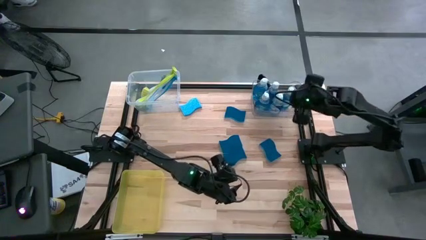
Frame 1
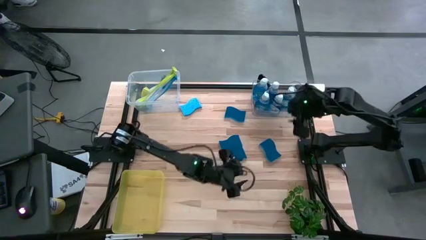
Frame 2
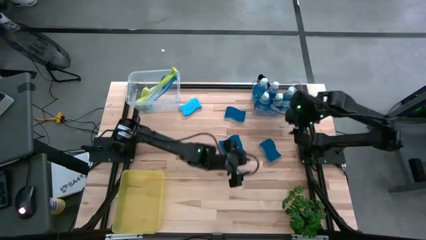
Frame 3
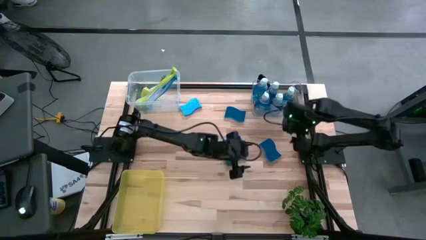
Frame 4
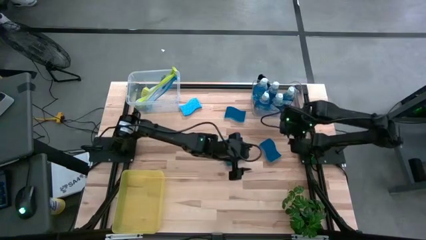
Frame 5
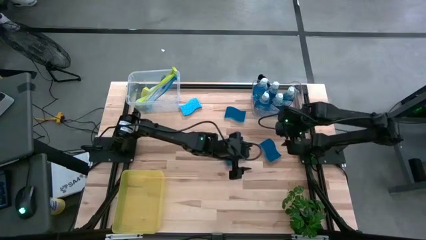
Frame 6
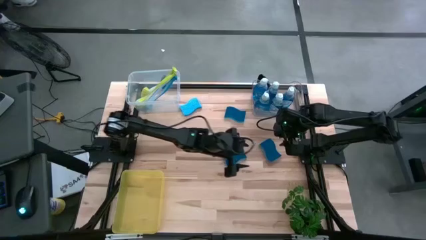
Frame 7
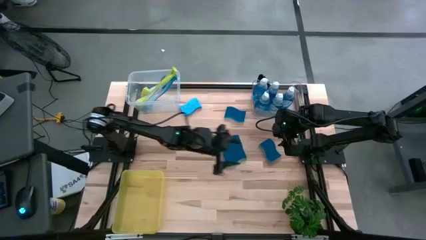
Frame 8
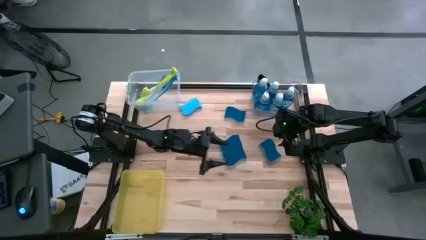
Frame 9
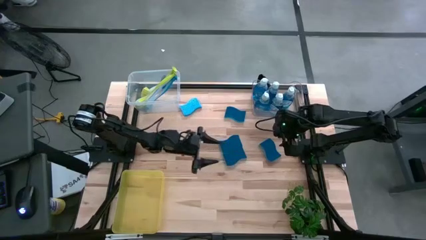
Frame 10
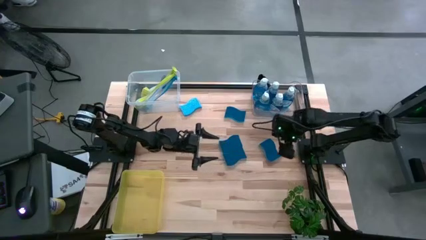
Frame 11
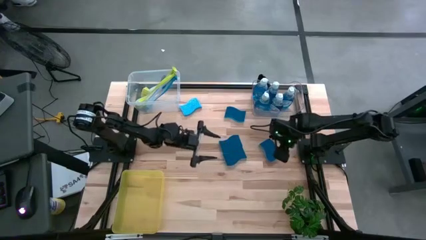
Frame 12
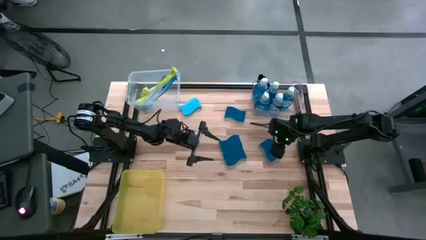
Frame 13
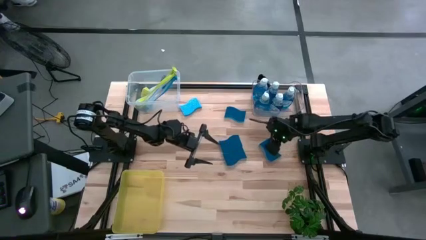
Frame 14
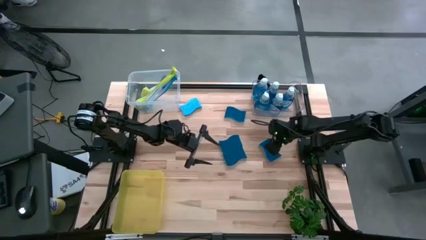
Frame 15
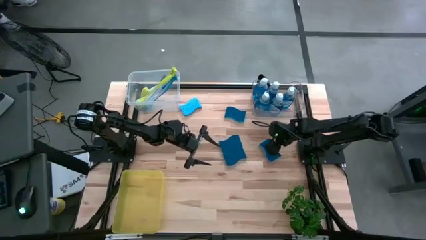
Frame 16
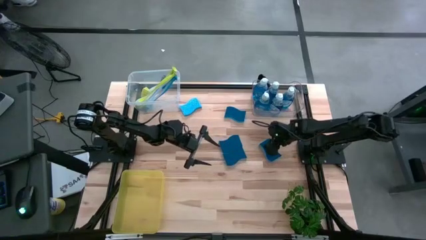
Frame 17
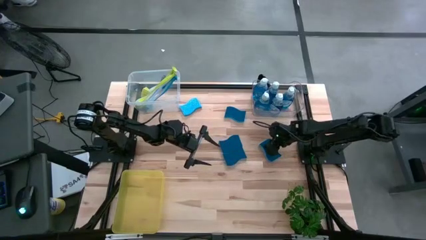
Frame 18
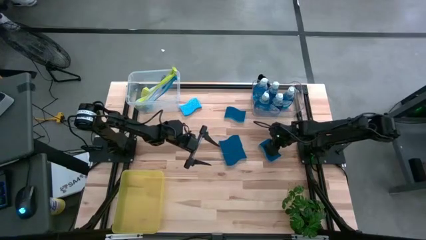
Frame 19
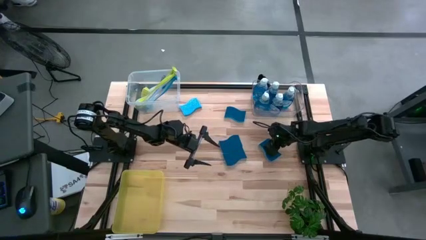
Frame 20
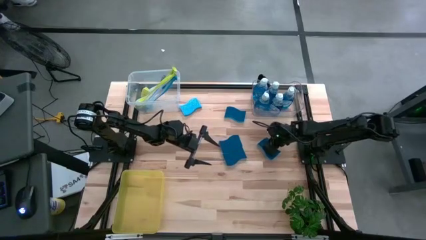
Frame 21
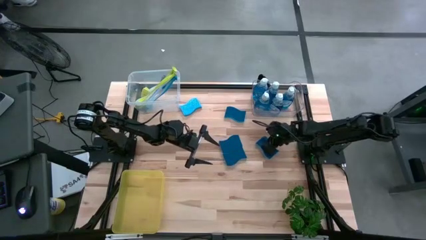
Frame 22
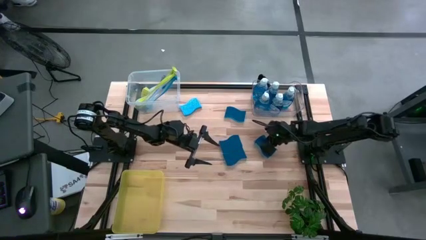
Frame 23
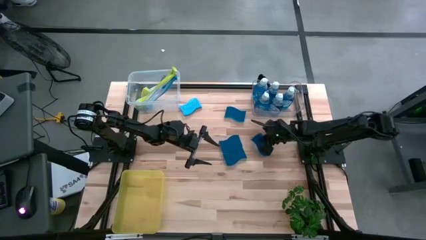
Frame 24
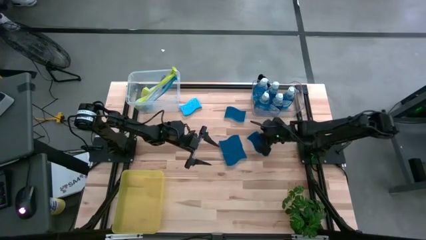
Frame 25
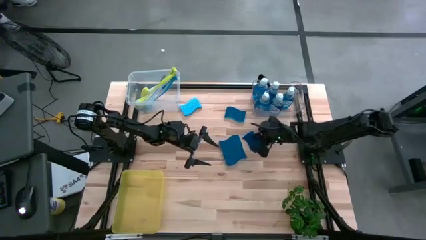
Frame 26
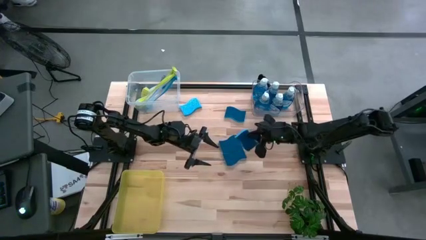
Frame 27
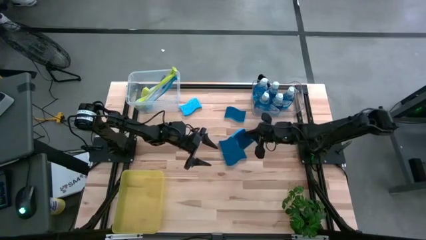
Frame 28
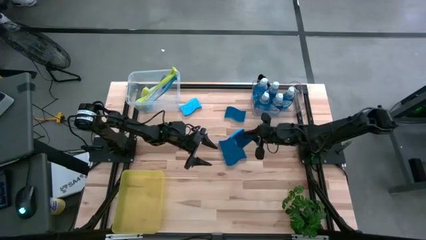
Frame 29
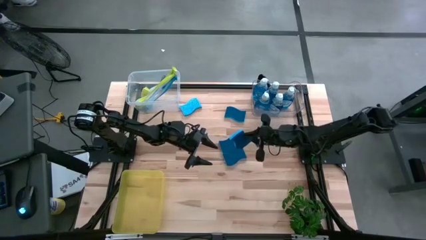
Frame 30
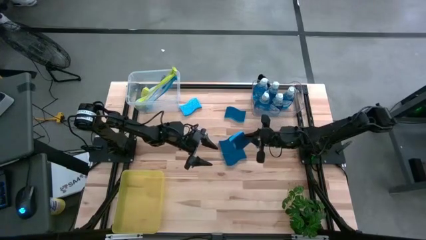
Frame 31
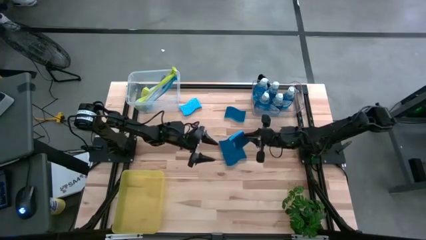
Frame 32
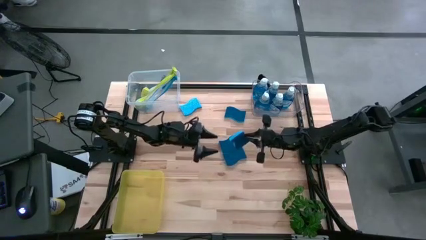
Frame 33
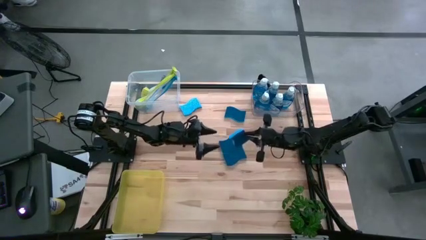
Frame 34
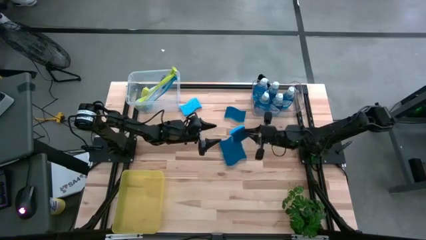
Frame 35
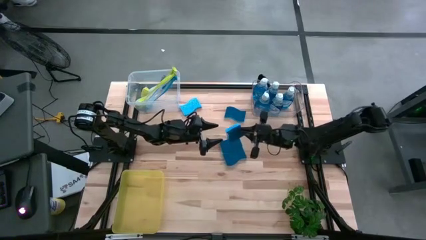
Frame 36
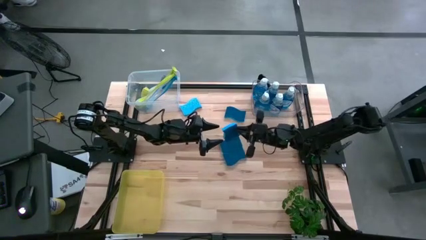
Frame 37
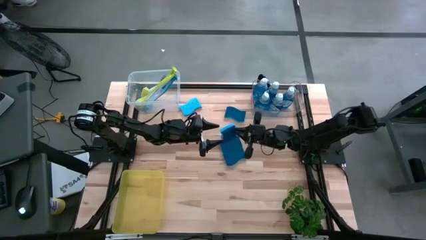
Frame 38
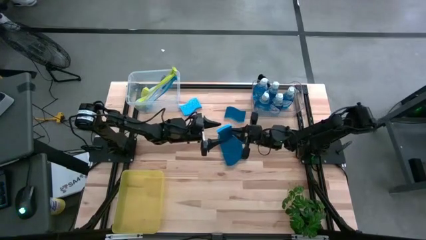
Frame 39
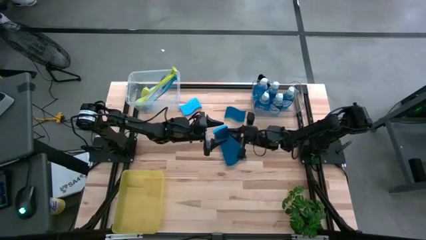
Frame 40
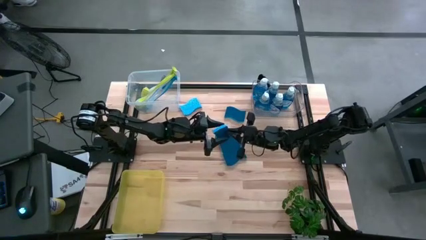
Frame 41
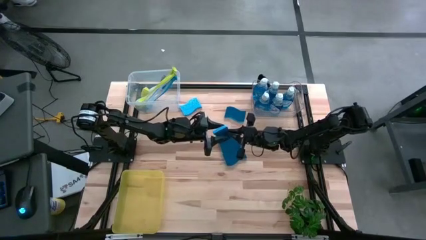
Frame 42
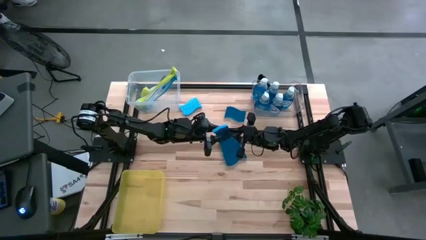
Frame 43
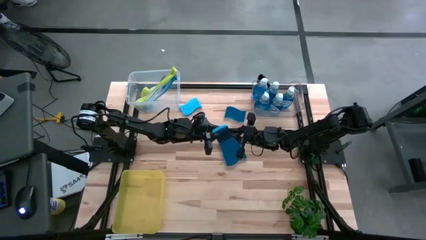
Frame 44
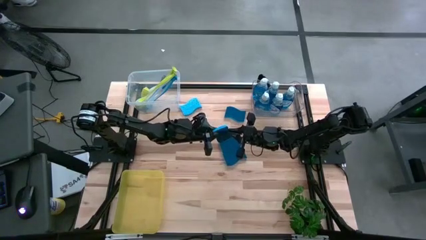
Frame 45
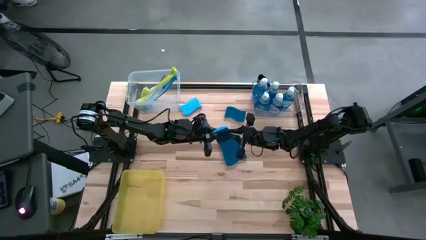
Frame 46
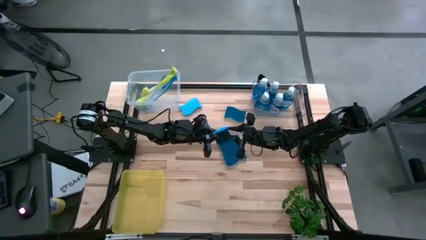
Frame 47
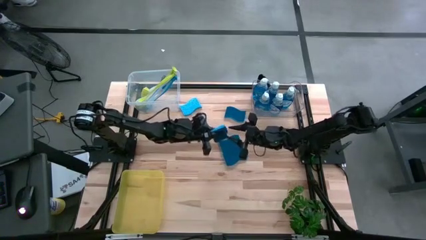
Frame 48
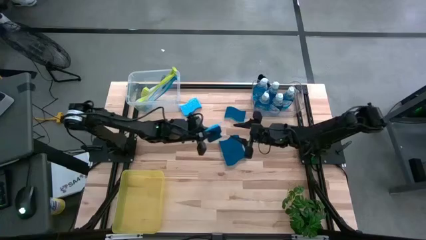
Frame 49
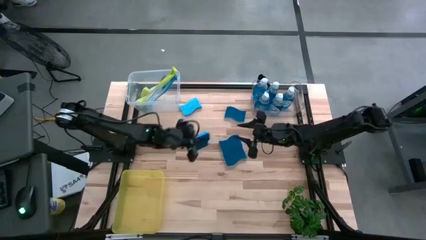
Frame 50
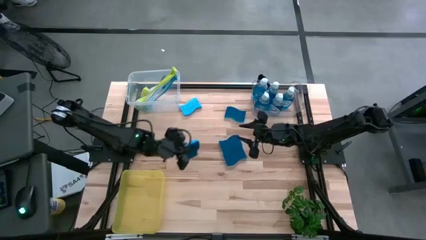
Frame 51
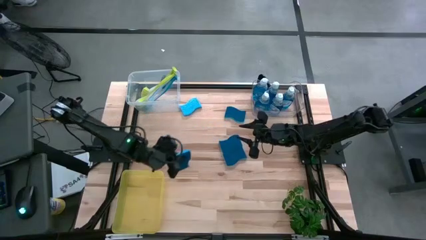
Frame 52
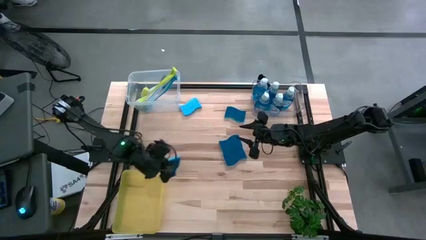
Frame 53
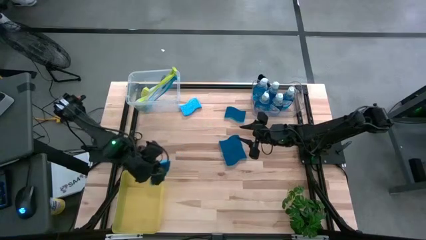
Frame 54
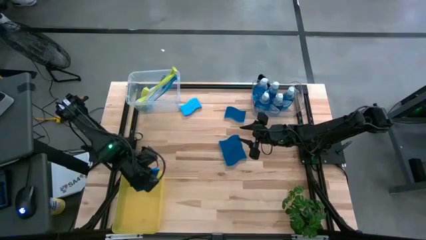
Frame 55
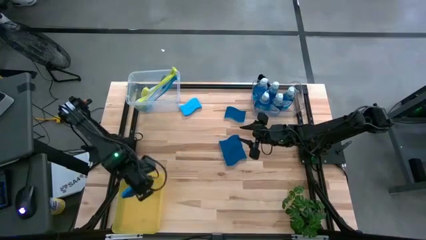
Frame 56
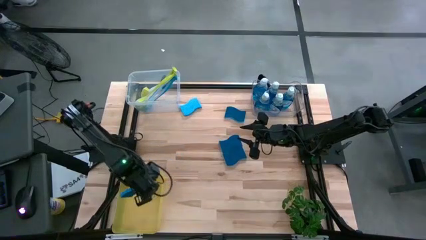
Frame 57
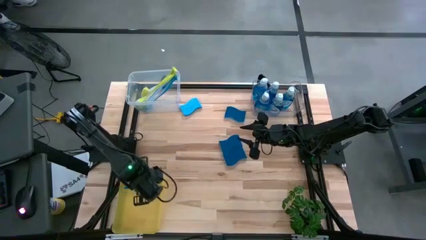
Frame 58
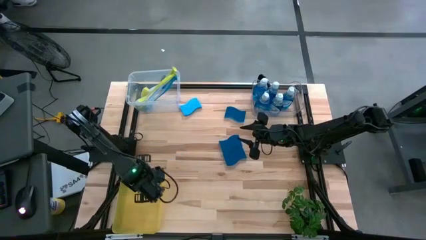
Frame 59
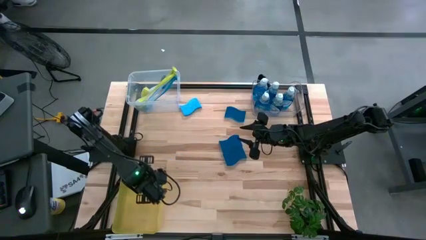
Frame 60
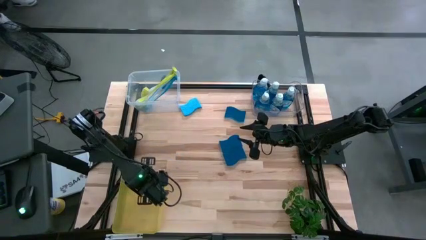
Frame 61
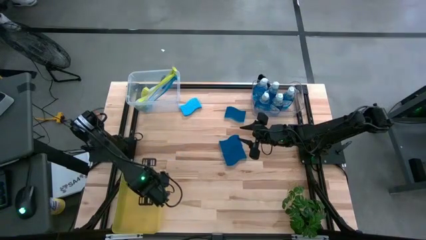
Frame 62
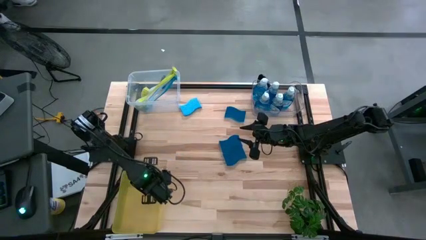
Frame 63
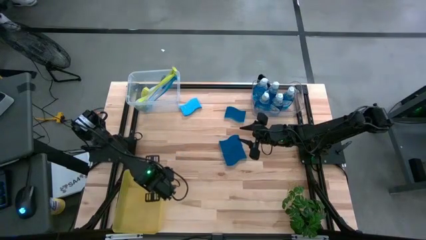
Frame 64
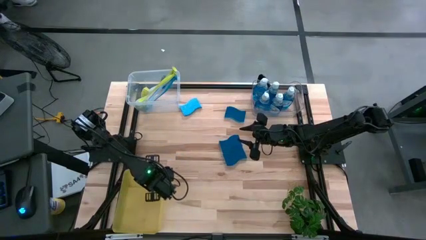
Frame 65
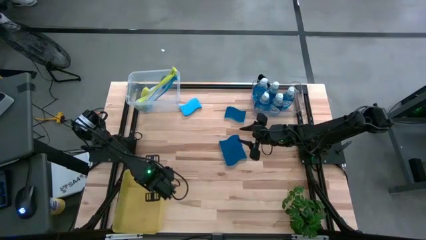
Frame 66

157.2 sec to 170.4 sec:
Task: Pick & Place Kitchen Sink Supplies
Put the bottom right sponge into the yellow bin

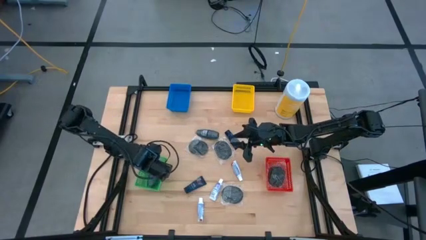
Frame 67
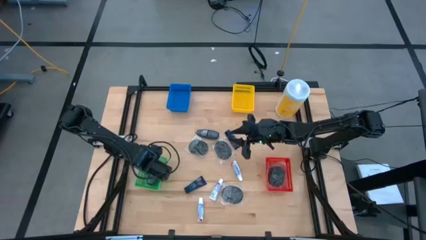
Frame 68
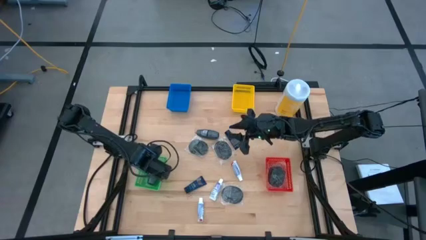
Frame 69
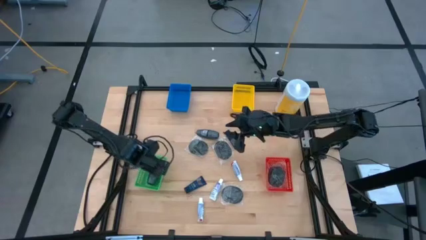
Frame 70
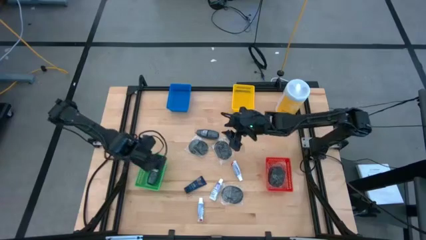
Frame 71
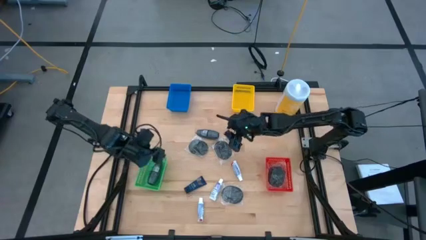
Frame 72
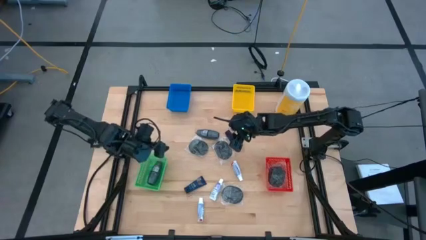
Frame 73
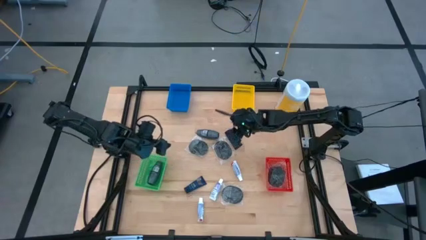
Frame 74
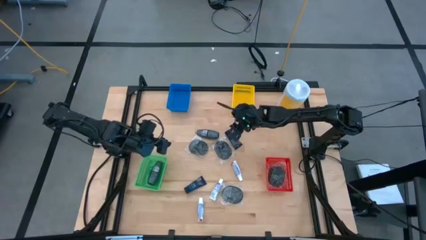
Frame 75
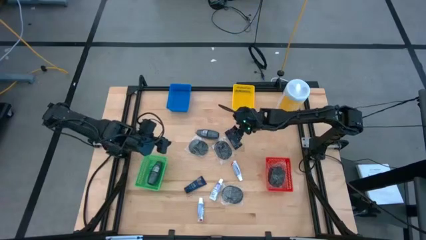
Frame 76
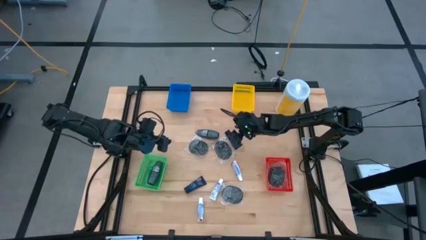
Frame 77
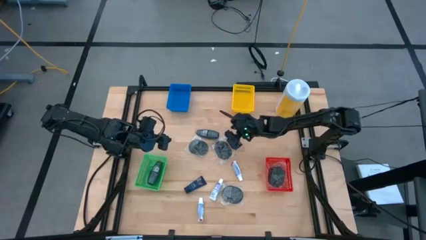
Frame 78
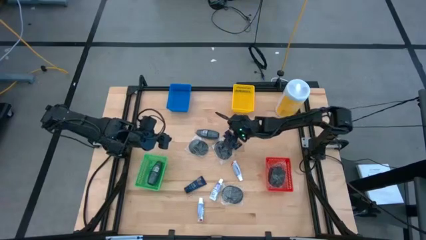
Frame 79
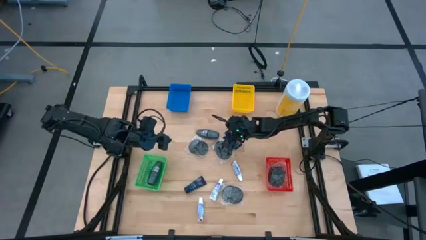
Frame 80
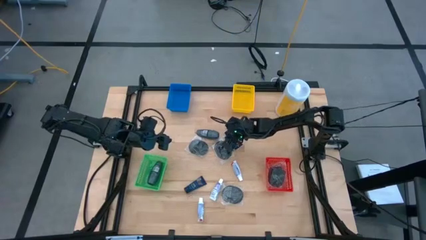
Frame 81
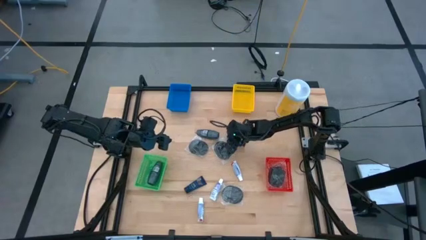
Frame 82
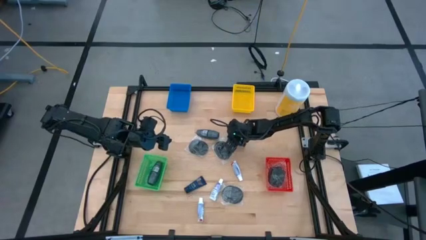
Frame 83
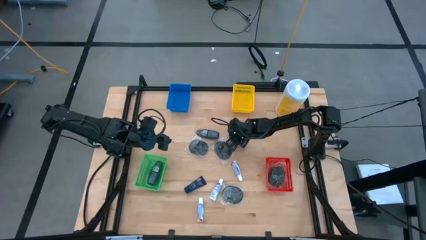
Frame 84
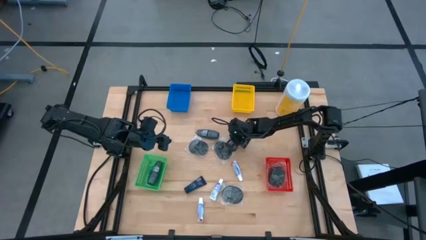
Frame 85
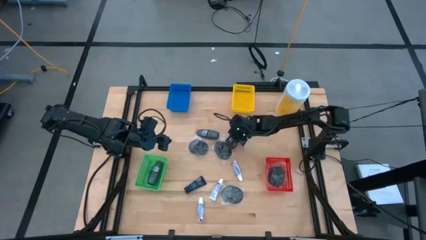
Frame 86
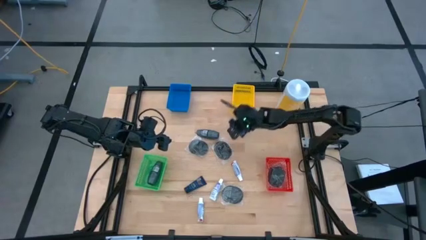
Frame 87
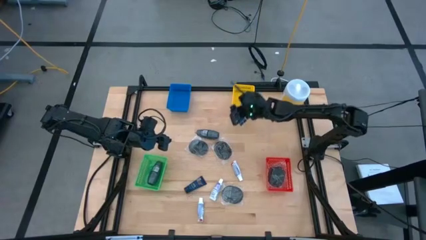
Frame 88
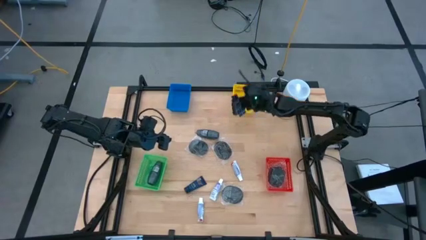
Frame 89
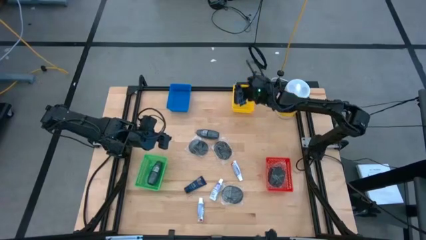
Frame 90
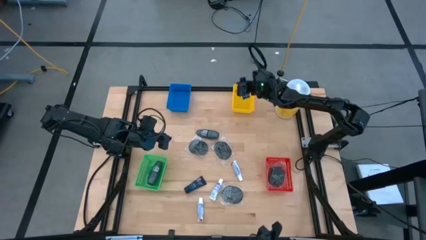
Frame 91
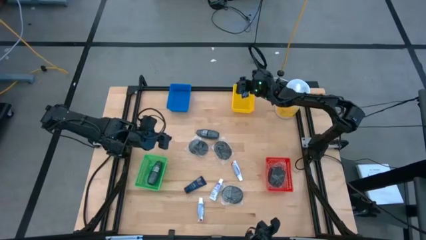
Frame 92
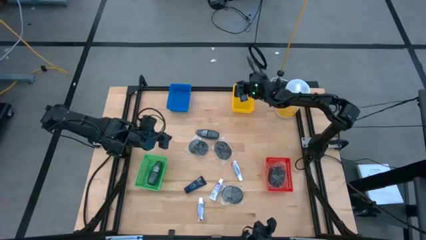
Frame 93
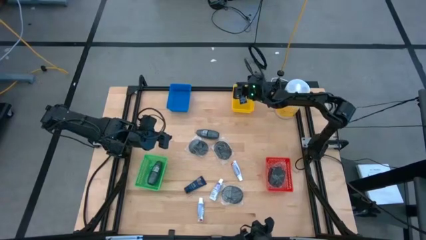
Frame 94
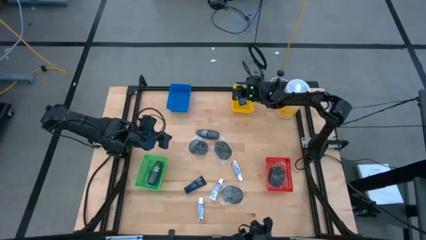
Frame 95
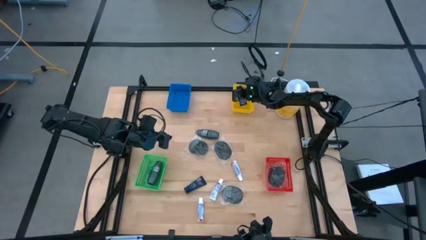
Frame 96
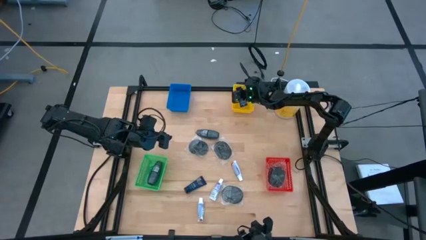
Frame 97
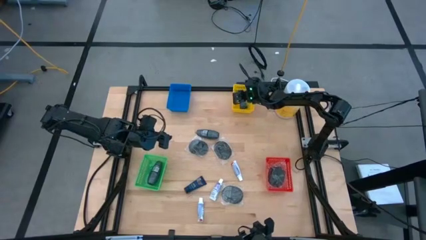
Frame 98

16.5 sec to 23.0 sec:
Task: Pick & Place Travel size toiletries
Put the shaving cream into the yellow basket
